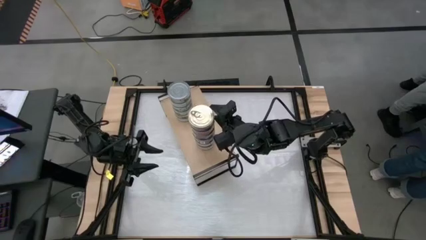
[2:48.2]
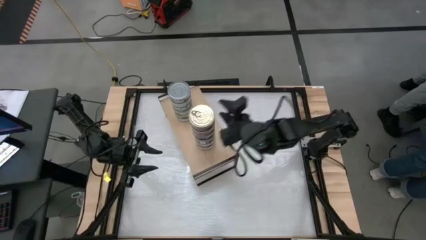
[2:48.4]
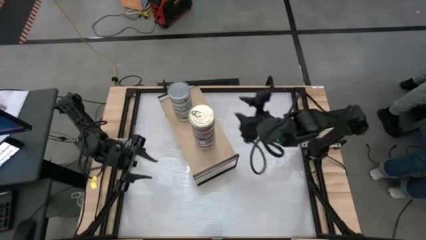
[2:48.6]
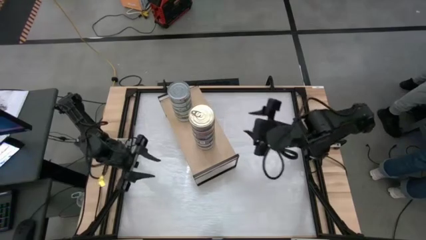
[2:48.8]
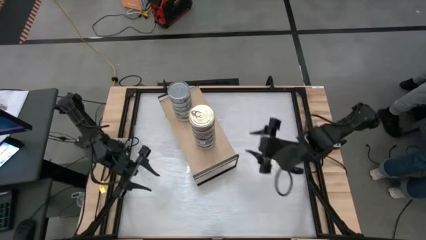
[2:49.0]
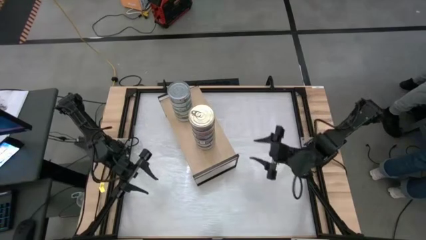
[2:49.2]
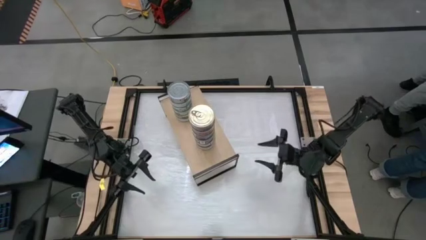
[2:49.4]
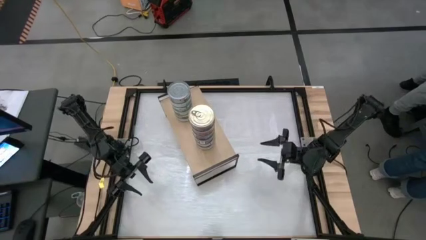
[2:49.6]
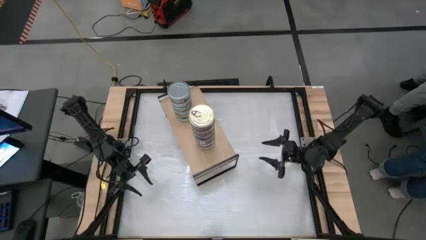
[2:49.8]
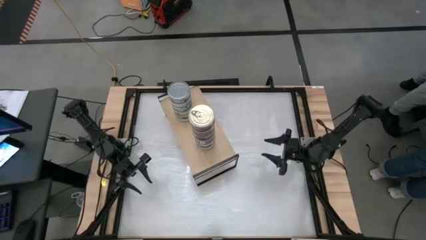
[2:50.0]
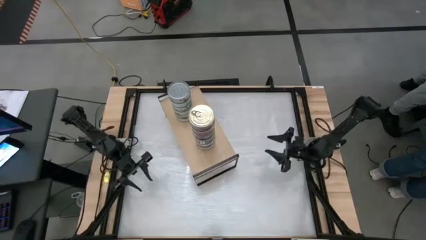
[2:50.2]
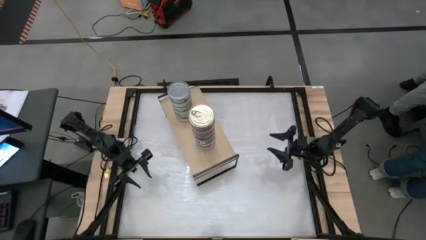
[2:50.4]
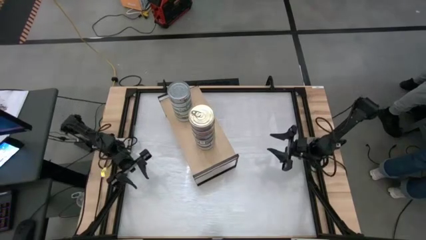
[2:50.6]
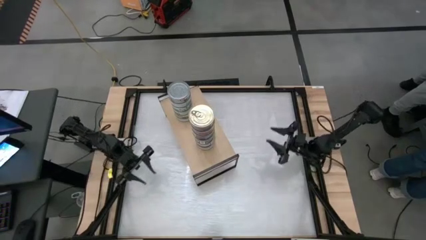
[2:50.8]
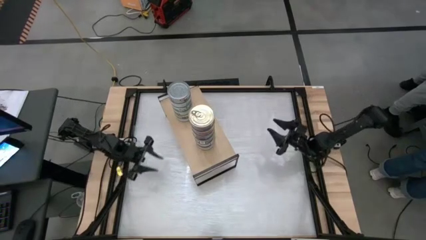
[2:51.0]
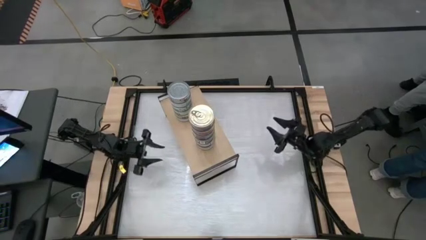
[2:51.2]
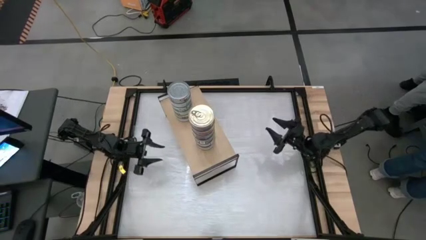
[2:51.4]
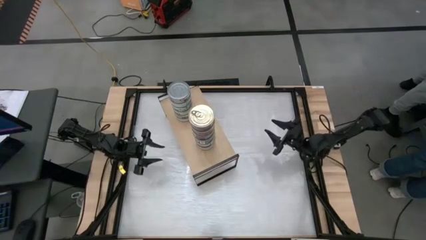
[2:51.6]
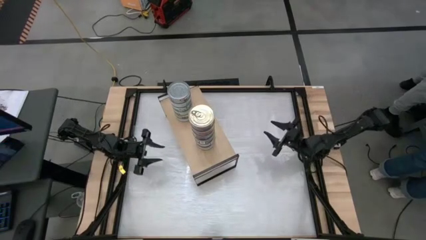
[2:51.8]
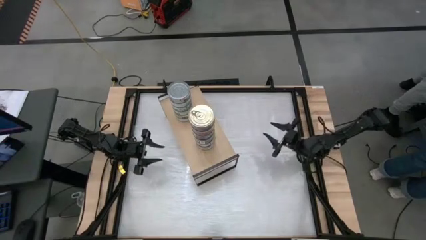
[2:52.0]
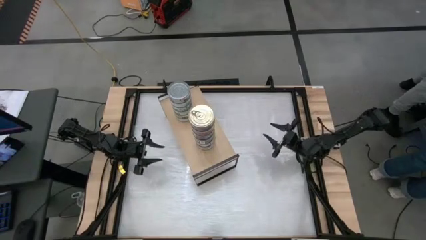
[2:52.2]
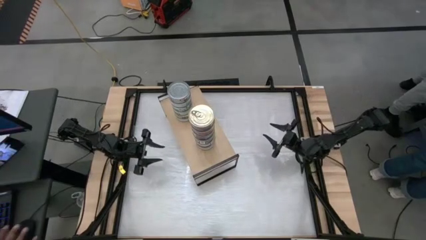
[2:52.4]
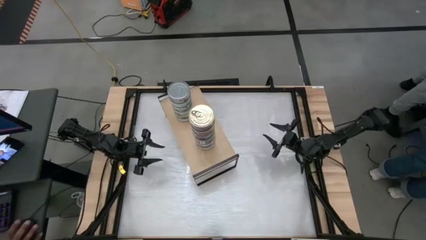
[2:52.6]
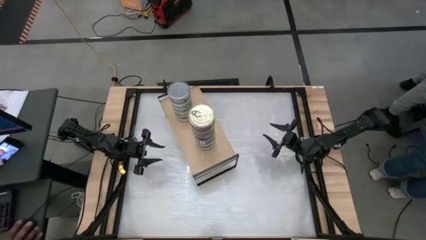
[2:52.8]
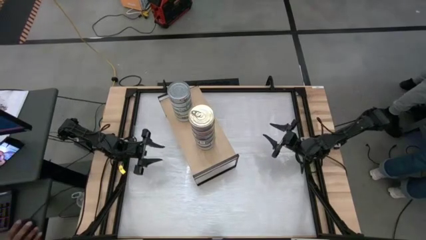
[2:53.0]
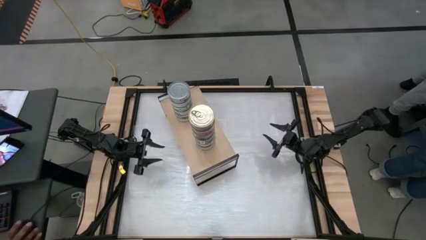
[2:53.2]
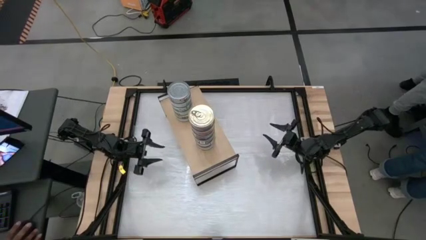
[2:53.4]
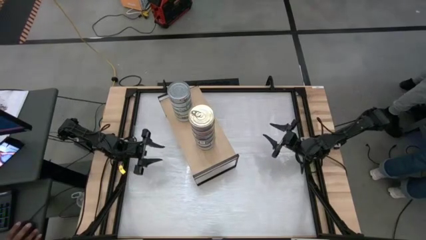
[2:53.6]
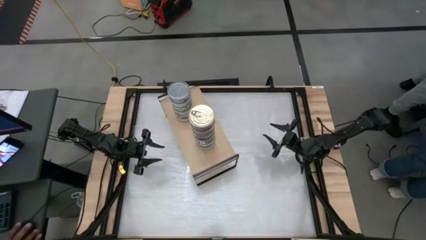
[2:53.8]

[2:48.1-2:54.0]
Task: Stack canned seafood by type on shelf
Return to Home Position

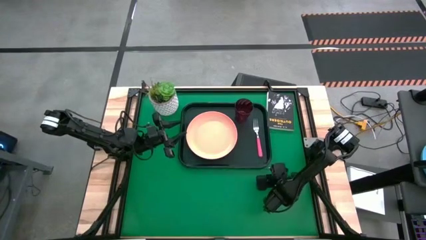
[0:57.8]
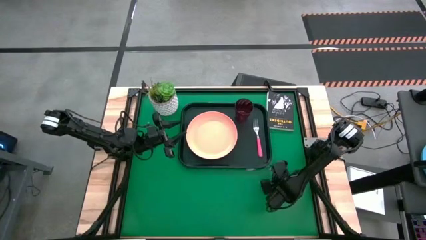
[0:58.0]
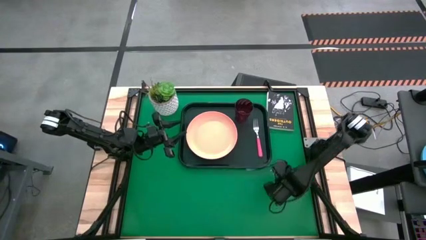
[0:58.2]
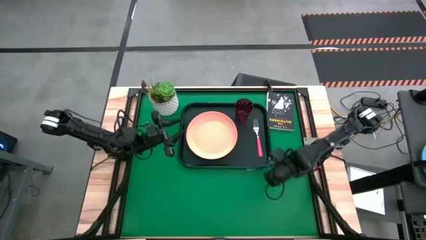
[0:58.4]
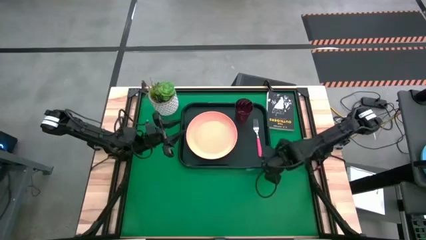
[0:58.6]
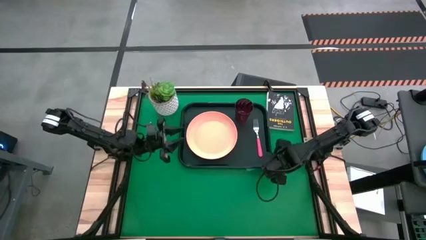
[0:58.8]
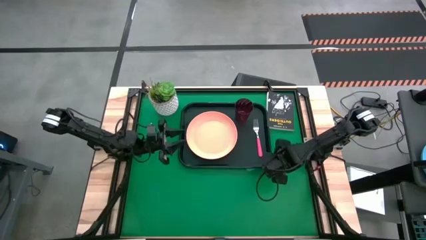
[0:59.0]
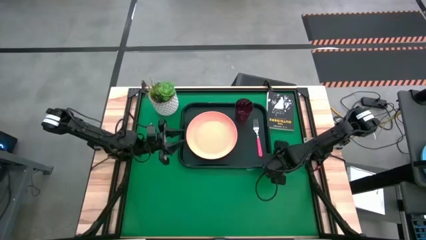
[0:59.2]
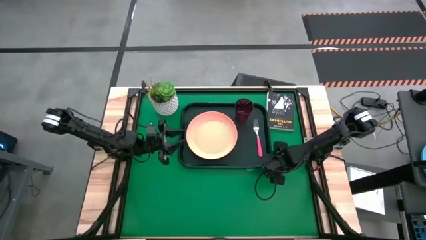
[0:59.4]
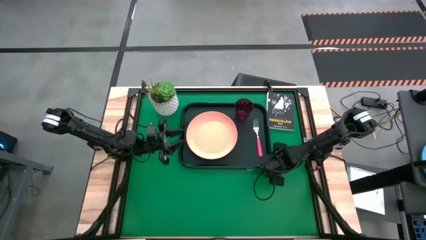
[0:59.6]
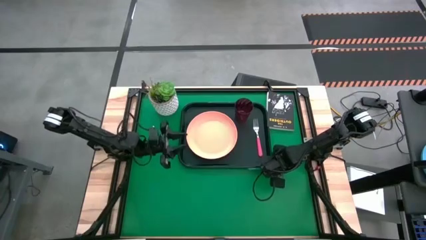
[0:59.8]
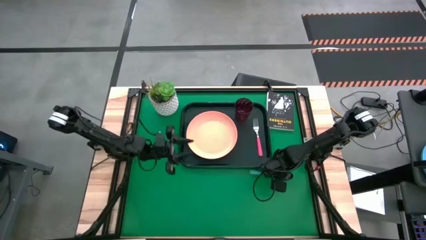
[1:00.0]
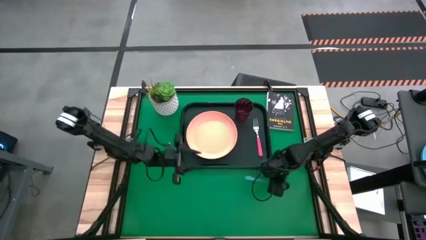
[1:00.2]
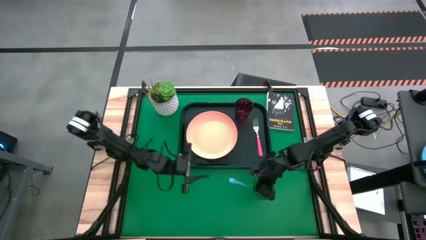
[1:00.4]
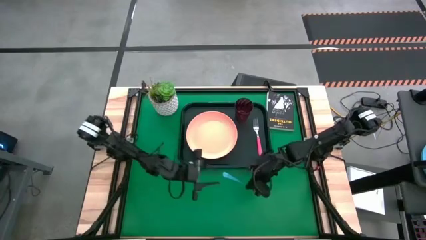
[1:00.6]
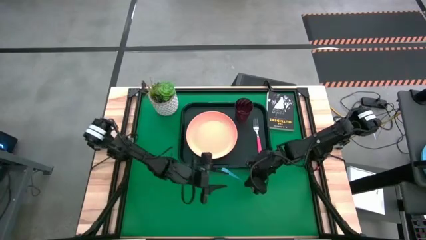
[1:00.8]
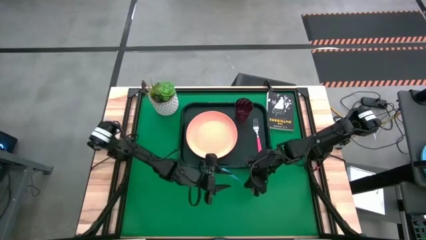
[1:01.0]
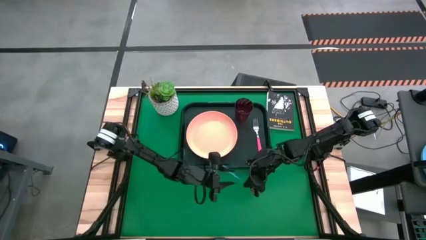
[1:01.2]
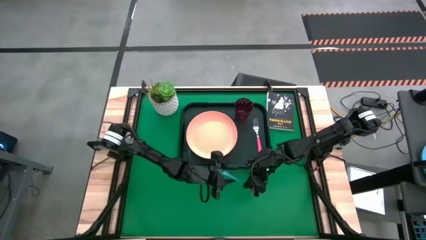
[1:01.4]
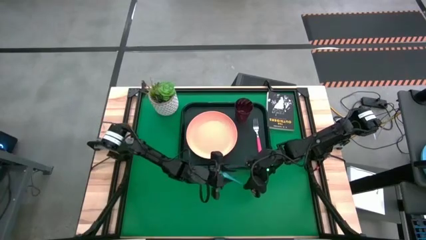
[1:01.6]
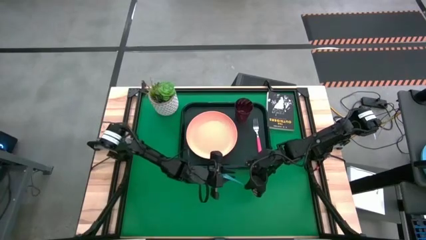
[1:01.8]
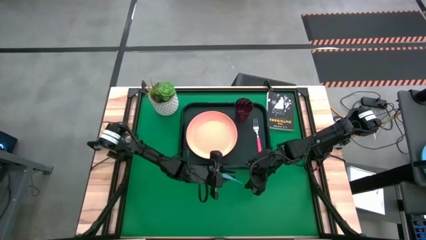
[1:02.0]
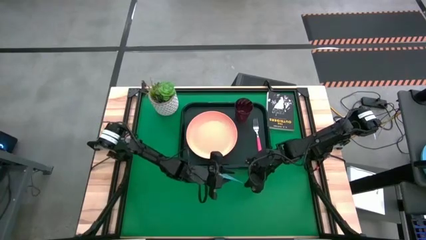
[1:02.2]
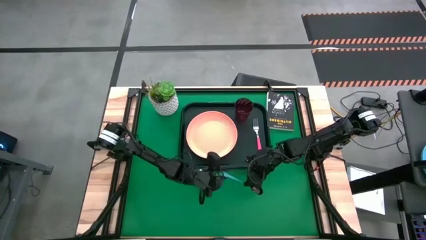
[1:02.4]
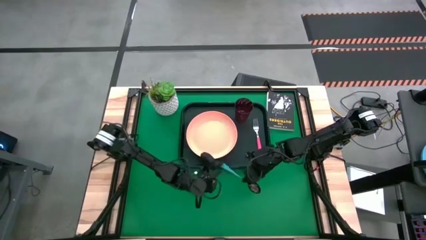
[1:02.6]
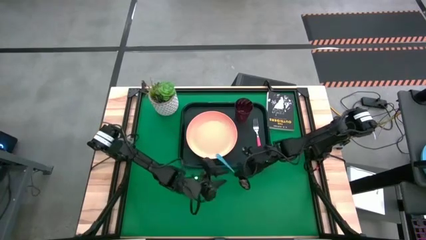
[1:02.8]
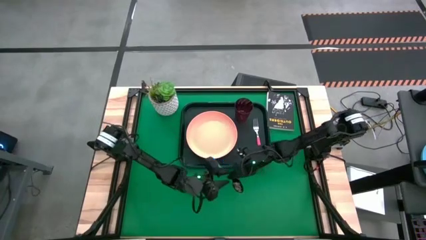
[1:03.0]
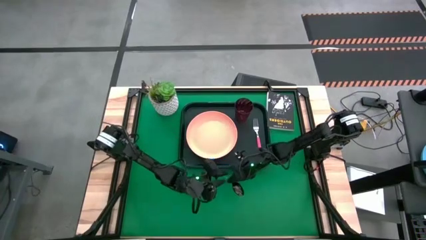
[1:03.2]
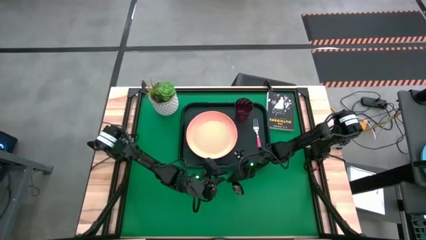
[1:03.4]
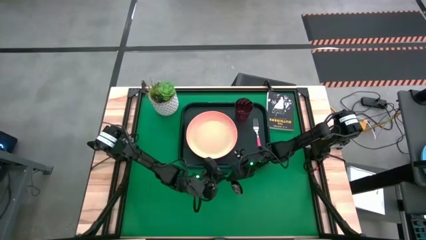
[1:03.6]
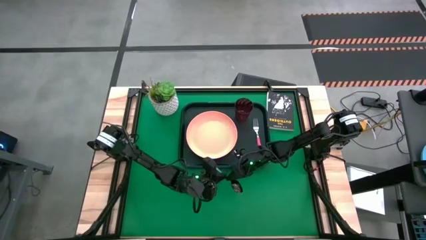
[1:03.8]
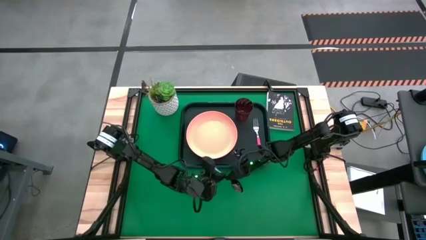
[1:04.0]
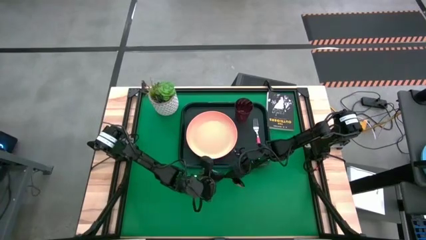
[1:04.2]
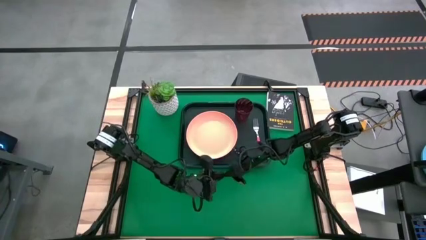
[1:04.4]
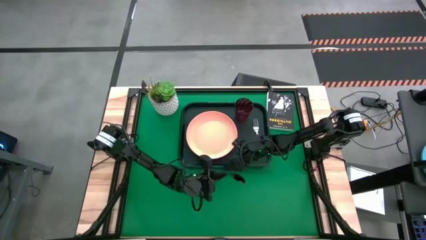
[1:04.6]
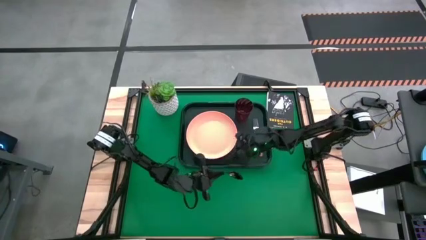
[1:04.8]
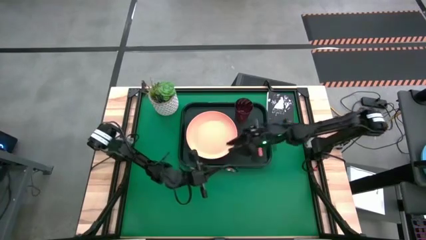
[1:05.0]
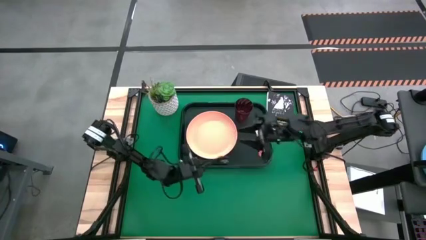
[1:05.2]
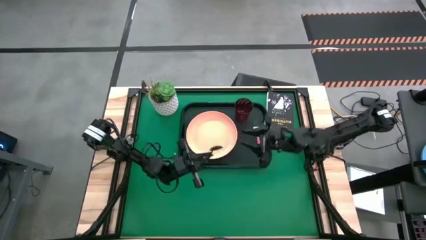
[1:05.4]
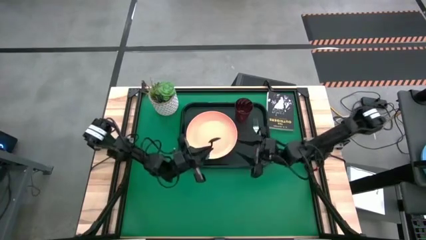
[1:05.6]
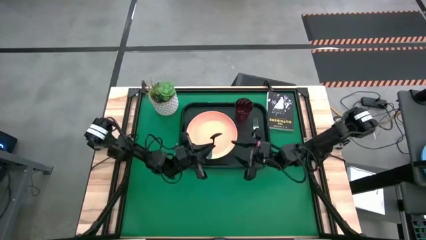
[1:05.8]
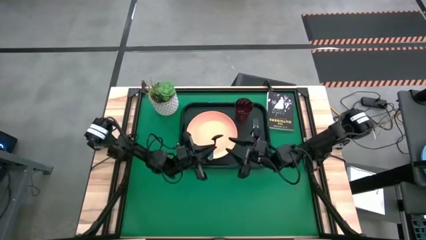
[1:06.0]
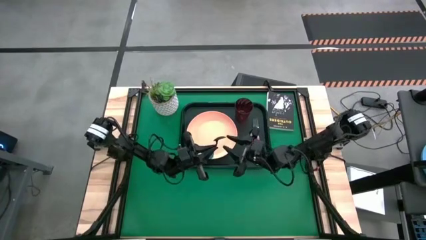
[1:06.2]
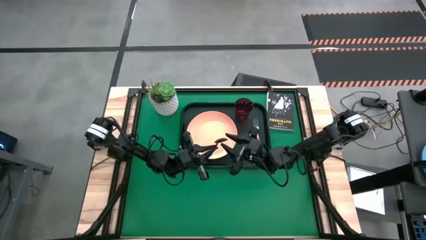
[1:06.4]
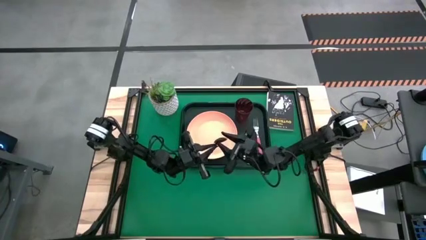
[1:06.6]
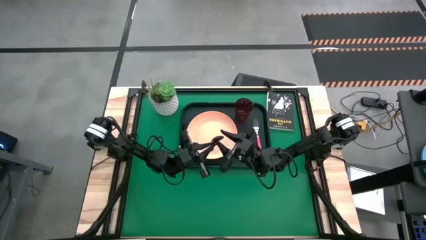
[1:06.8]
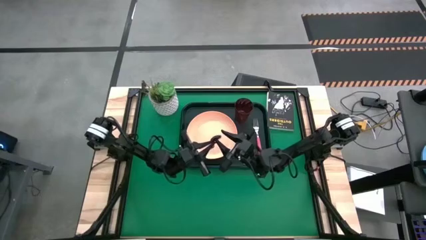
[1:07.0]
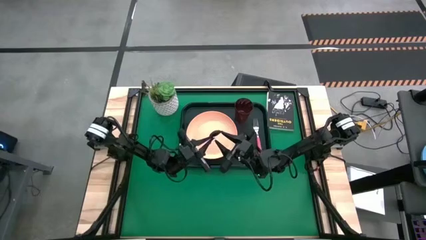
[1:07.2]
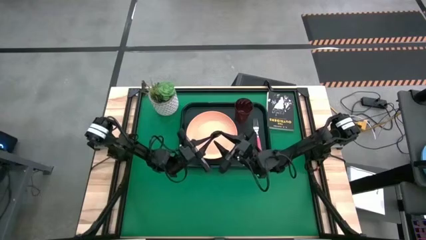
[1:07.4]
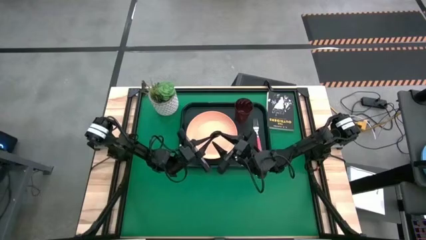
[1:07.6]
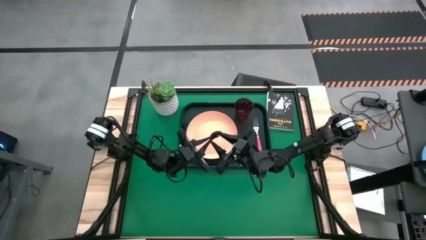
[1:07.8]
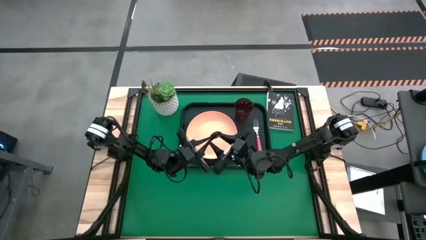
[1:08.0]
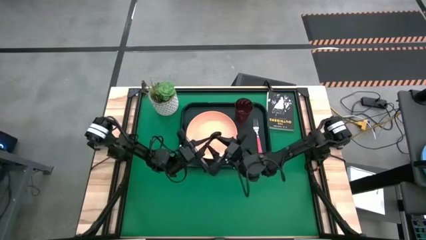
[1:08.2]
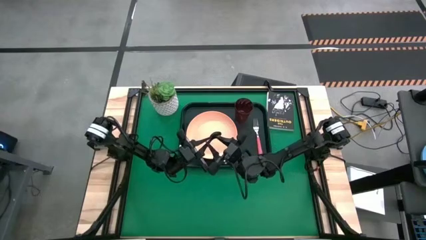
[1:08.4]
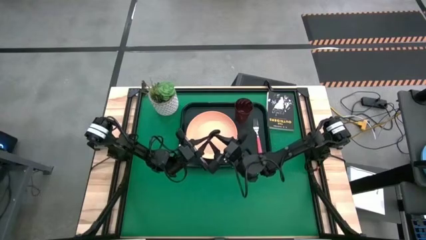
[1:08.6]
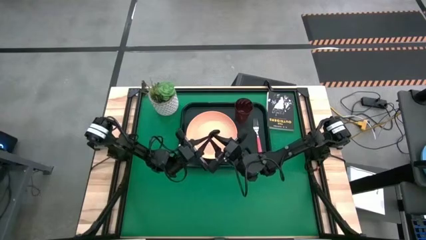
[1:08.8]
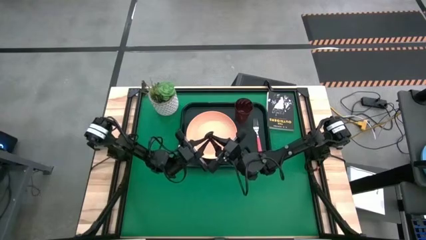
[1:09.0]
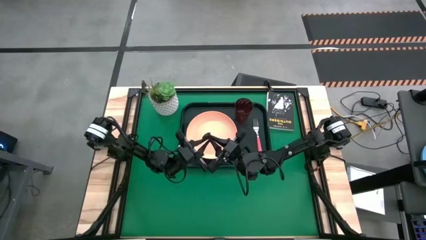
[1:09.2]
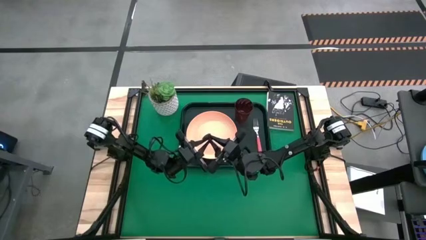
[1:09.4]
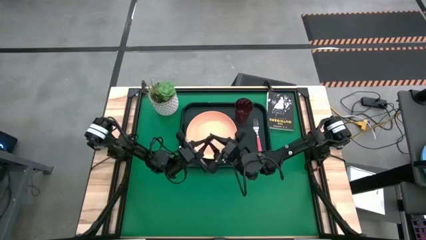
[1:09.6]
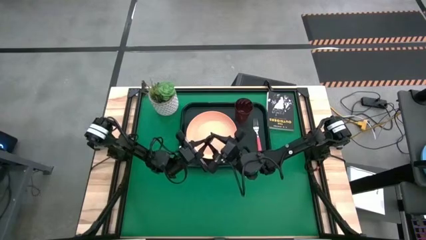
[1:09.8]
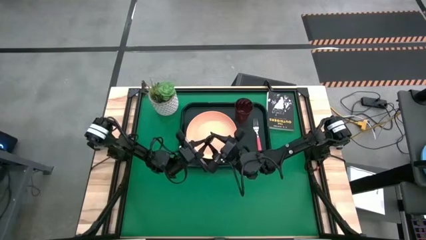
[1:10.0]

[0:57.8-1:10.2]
Task: Pick and place plate/cup/fork/spoon on tray
Put the blue spoon on the dark green serving tray to the right of the orange plate
